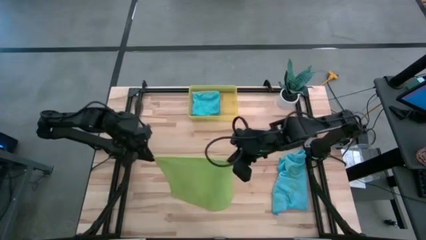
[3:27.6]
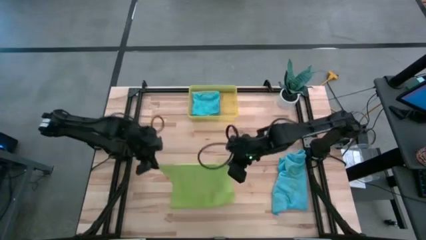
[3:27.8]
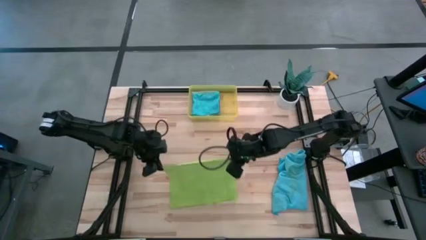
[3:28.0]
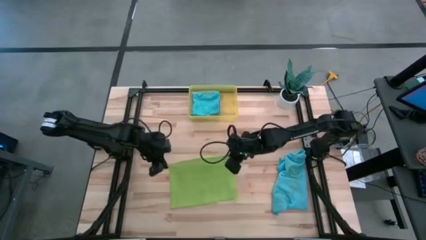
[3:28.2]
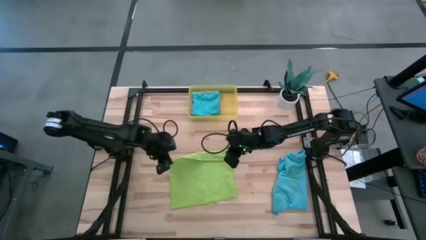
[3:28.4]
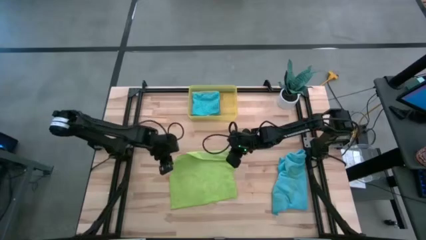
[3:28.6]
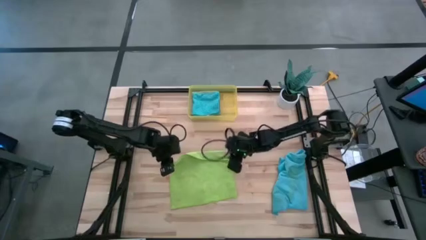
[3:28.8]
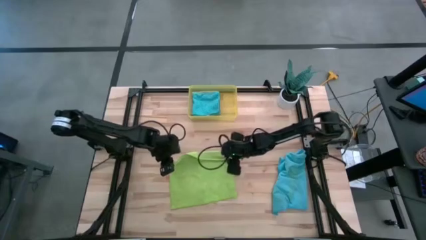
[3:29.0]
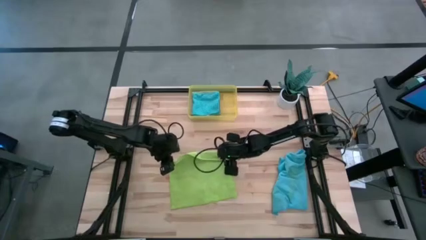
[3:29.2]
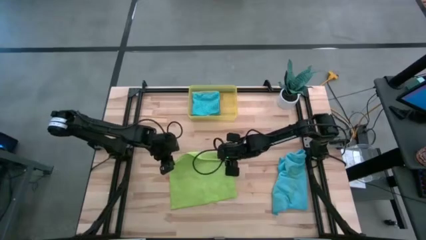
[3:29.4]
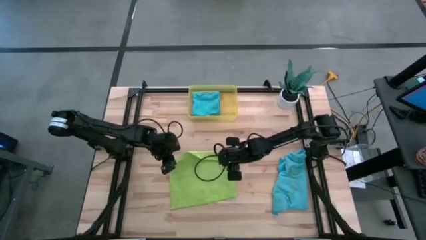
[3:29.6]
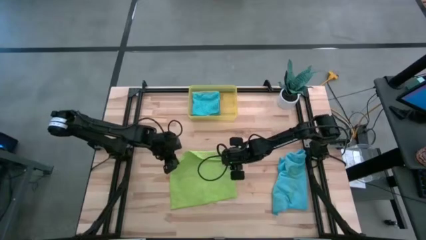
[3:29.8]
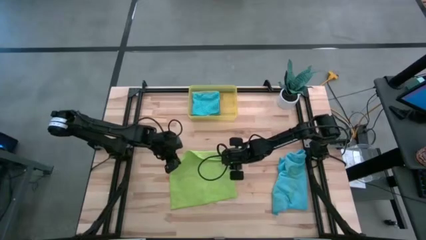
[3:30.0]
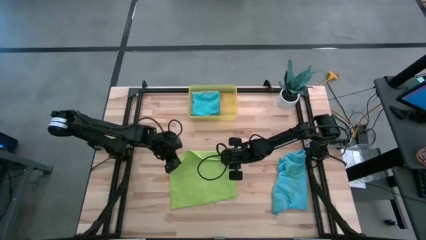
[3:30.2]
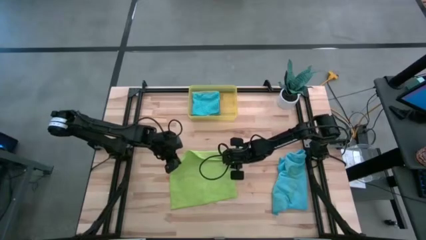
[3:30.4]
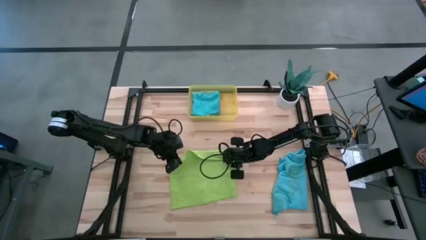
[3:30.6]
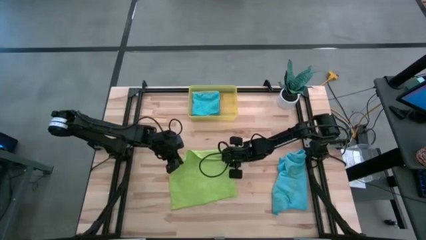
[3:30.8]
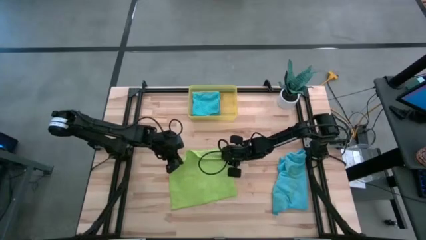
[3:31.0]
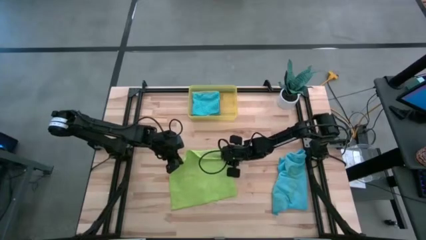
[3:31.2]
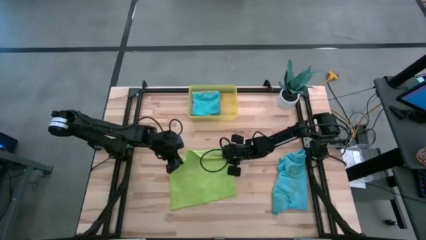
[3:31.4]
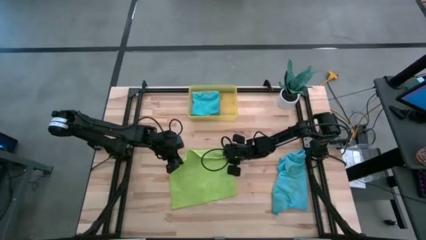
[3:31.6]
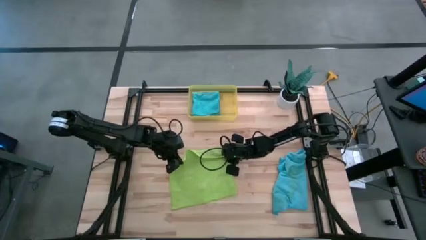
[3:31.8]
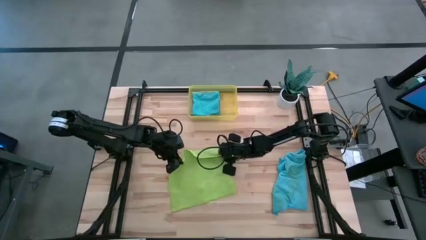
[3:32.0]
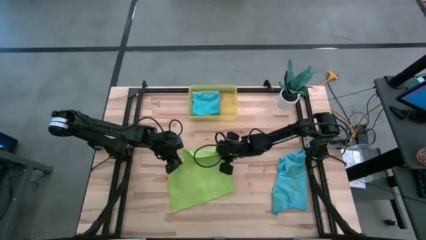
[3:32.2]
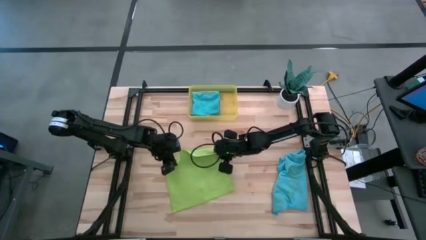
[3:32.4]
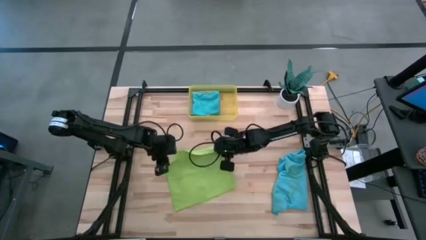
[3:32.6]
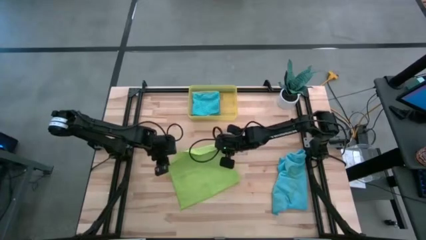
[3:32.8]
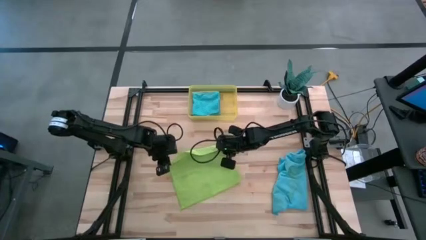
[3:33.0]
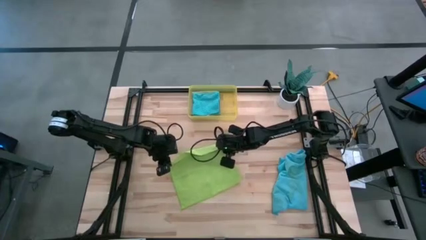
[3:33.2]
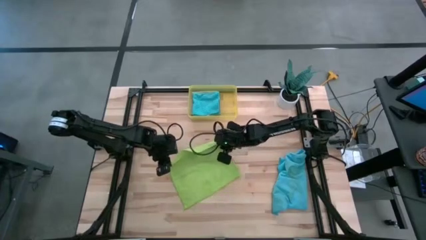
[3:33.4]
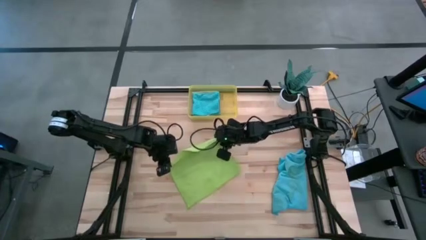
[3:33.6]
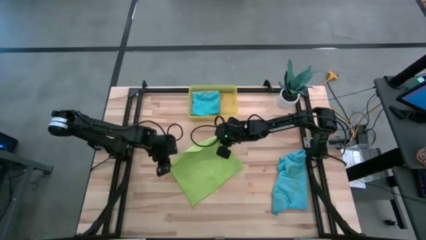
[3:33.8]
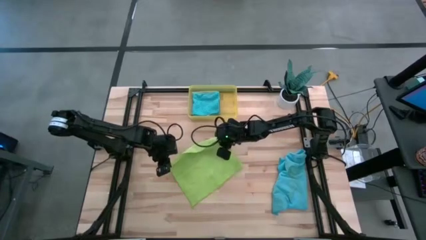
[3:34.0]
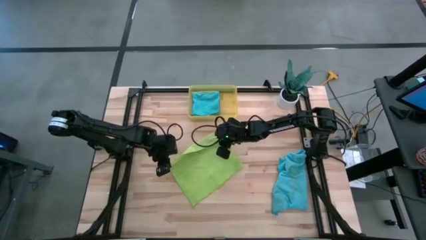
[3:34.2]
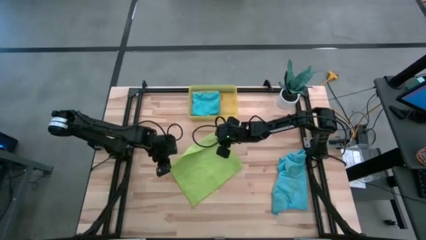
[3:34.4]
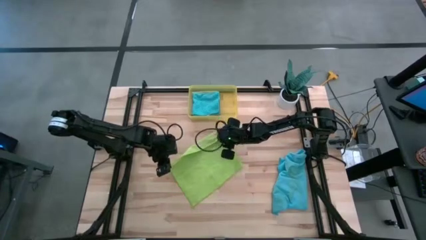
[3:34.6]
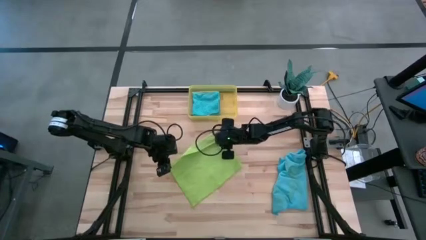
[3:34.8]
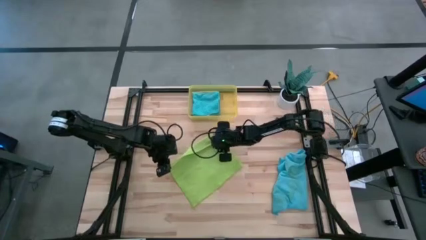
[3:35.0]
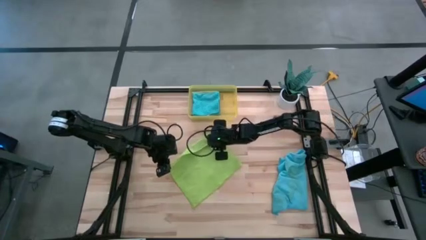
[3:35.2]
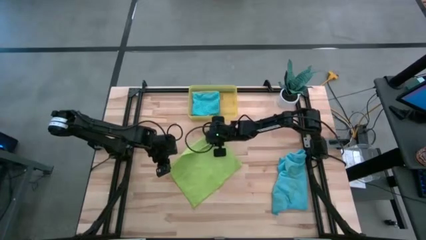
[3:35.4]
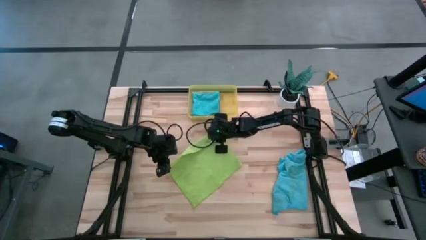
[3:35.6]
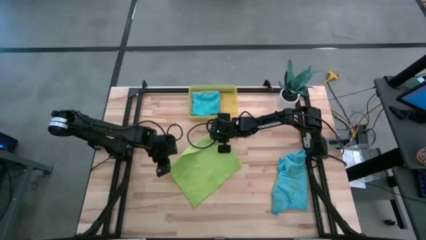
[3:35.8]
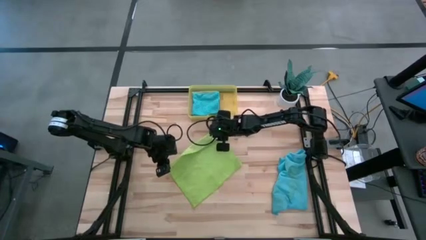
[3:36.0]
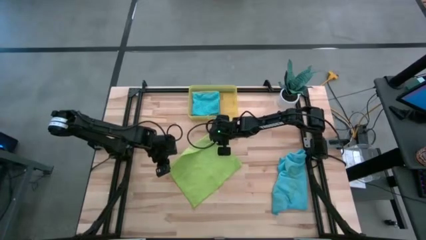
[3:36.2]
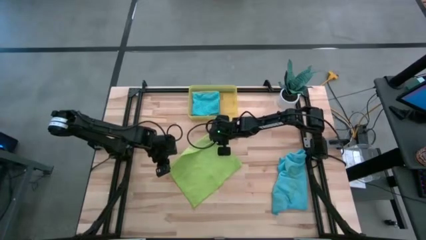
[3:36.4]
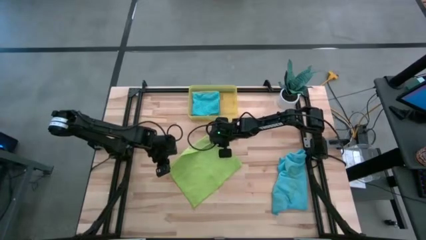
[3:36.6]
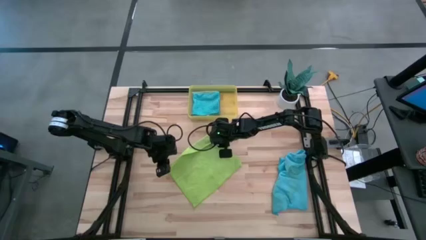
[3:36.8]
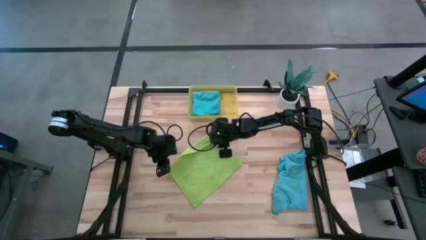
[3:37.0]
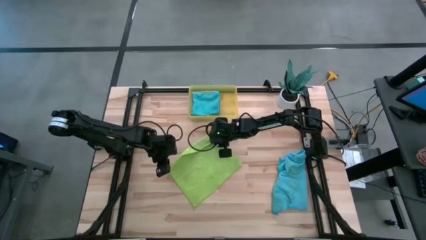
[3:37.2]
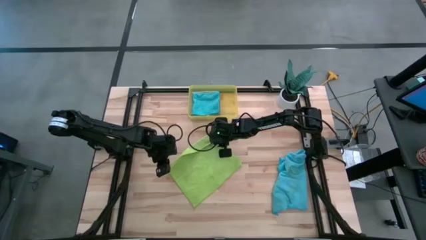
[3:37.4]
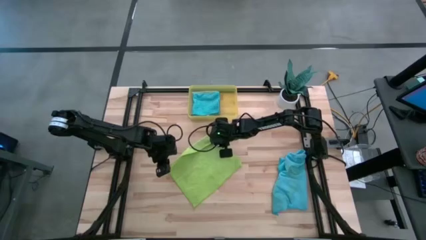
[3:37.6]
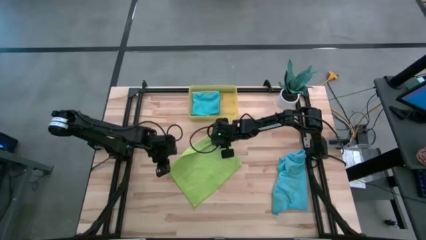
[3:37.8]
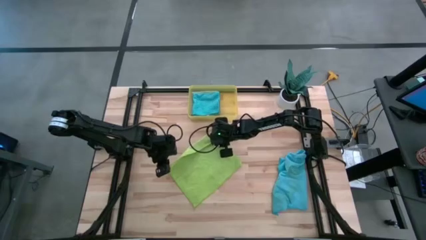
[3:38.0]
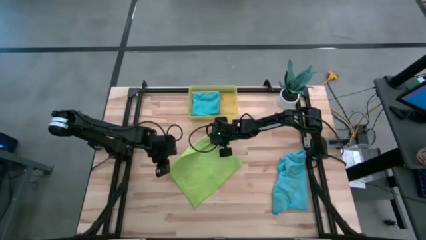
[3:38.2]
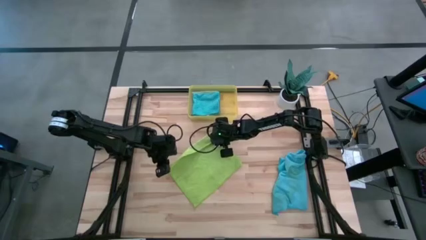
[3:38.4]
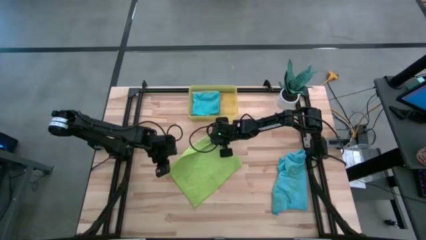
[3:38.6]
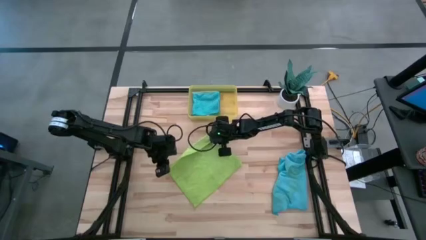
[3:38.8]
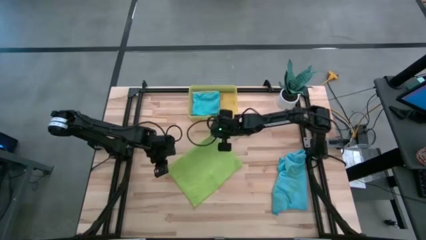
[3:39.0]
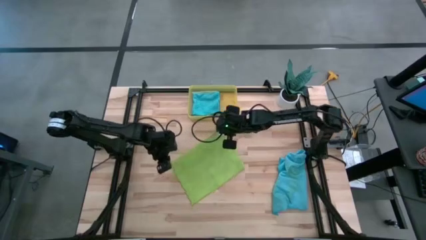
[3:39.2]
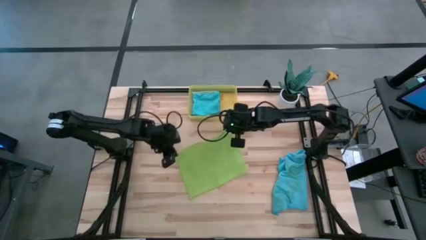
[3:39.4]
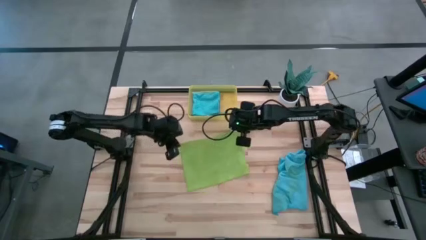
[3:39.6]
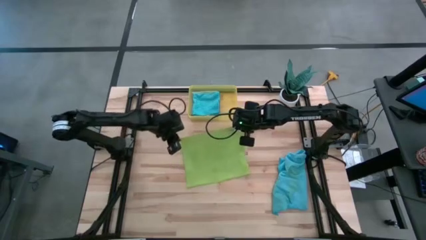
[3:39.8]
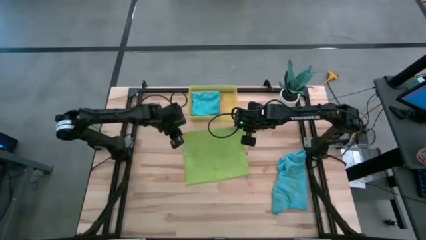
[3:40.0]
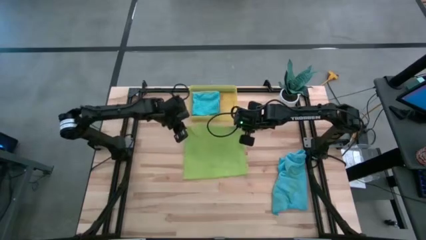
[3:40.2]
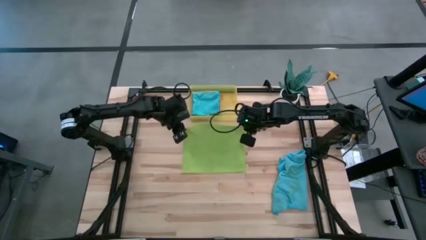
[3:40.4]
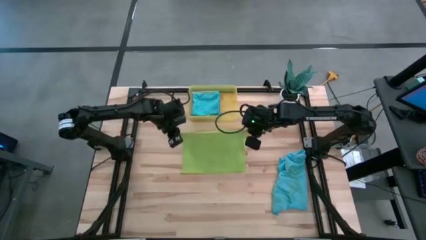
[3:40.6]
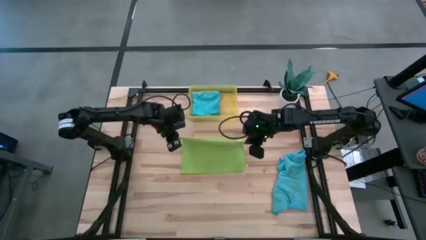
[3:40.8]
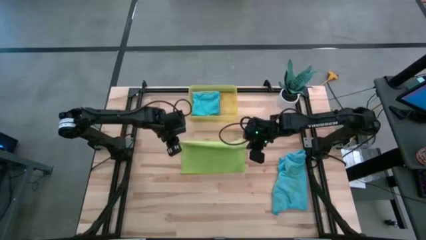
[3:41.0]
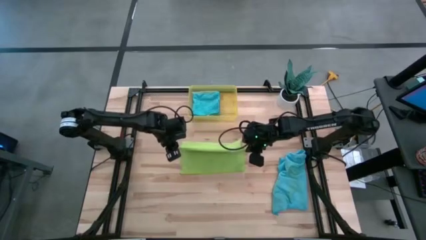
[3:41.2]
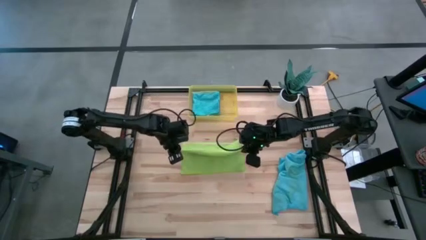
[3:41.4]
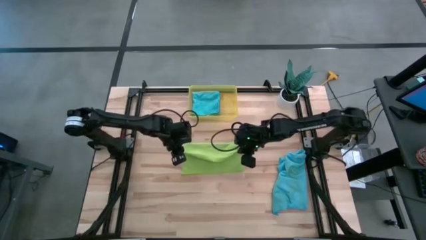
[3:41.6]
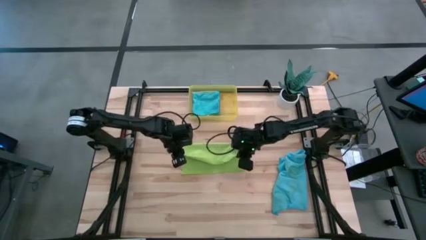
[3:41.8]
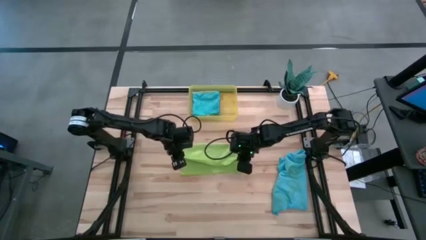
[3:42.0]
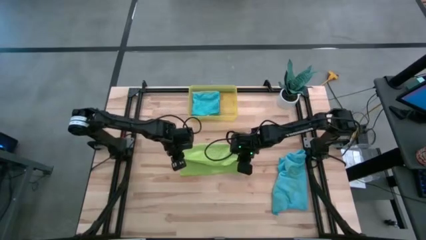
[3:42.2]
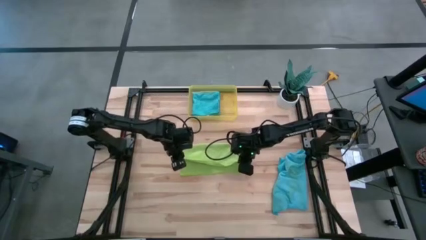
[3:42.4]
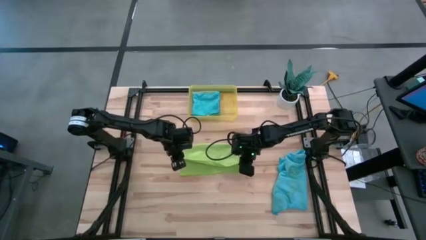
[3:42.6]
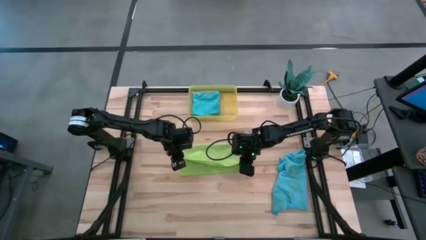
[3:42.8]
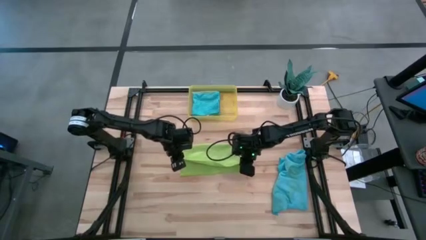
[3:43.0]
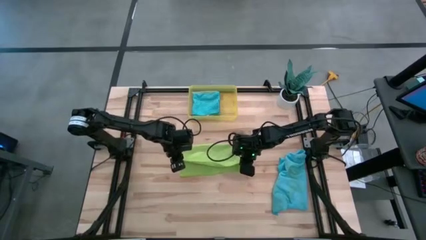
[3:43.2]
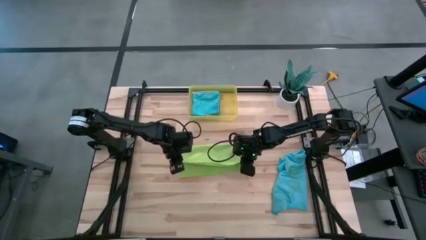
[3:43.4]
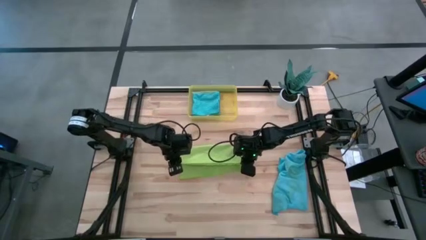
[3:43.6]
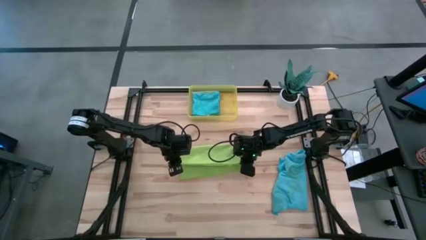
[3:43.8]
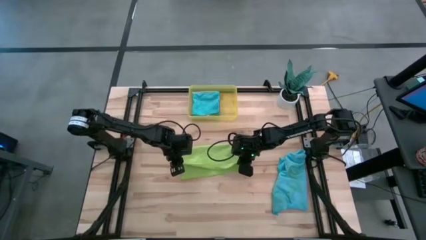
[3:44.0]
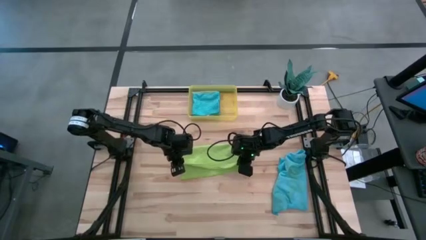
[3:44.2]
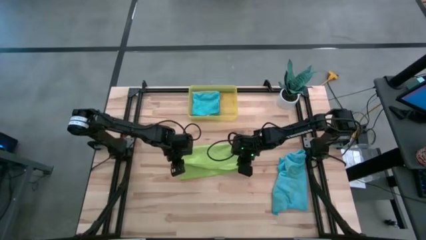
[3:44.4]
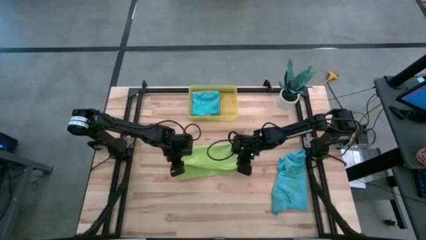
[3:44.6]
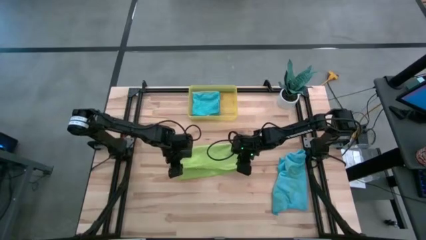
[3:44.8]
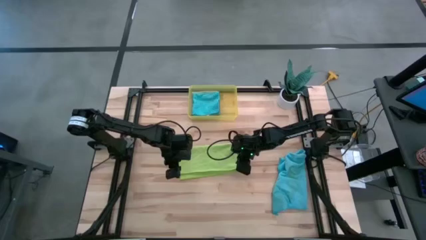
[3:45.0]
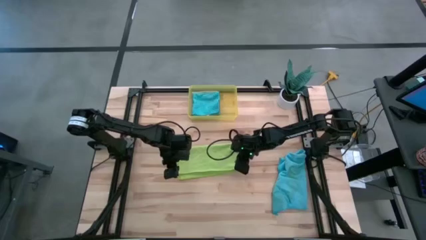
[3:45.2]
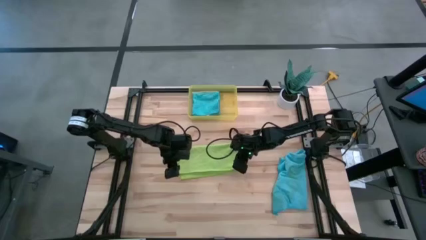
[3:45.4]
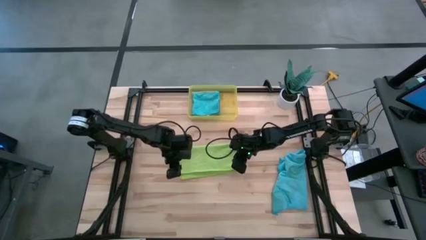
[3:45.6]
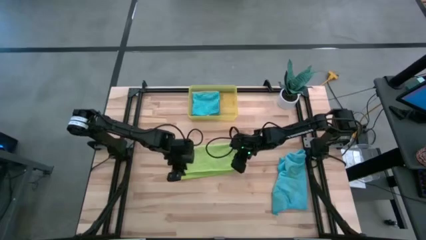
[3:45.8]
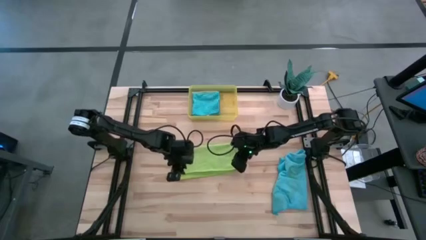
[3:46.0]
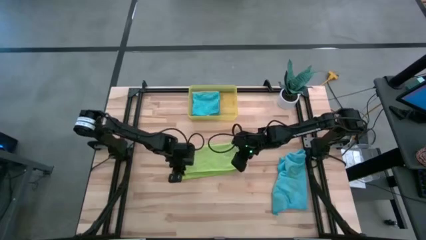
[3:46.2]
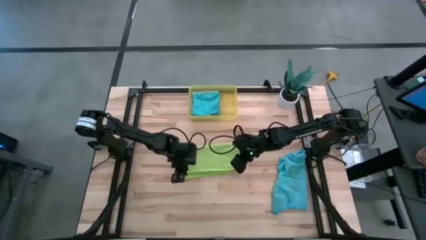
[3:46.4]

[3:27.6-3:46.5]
Task: Fold microfiber towels
Fold the green microfiber cloth
